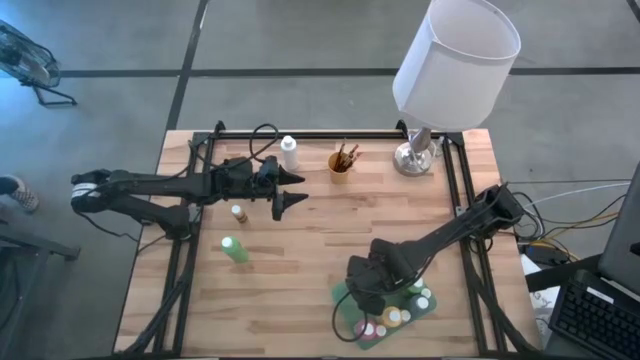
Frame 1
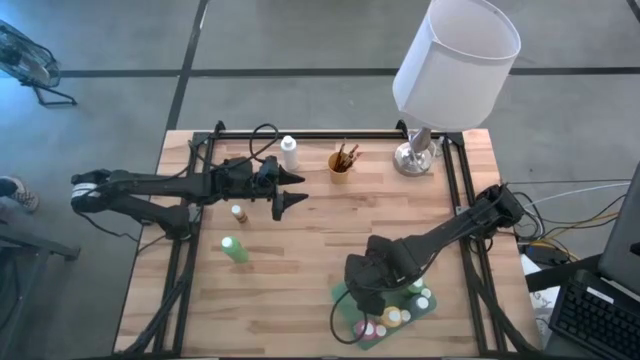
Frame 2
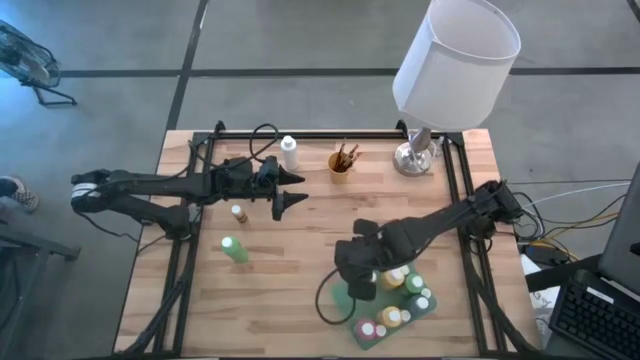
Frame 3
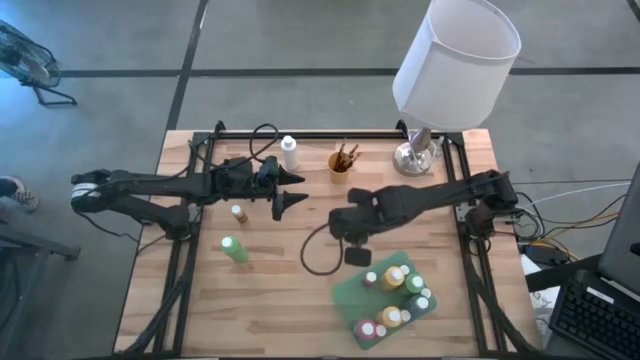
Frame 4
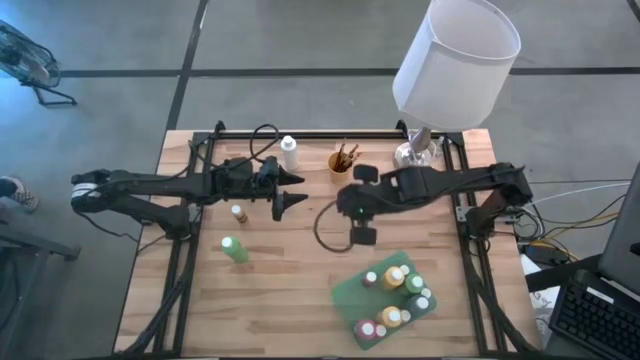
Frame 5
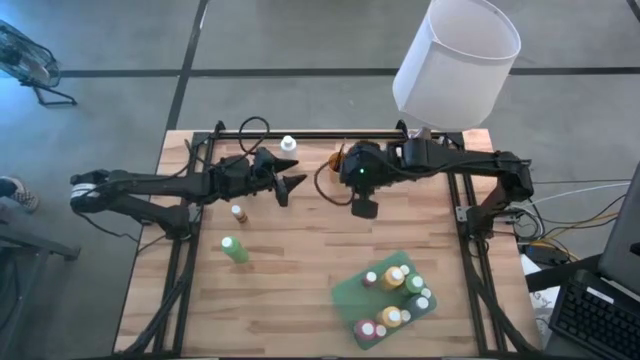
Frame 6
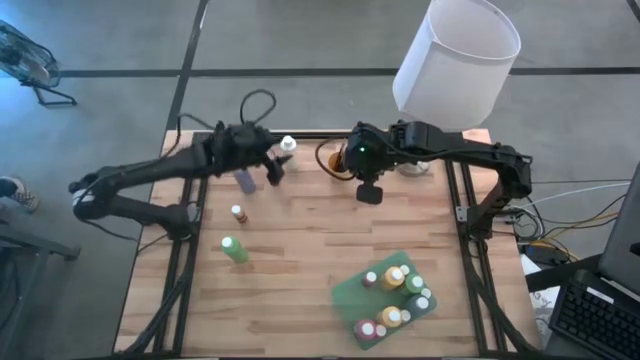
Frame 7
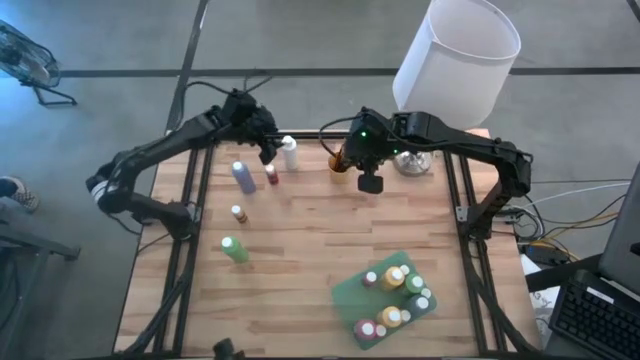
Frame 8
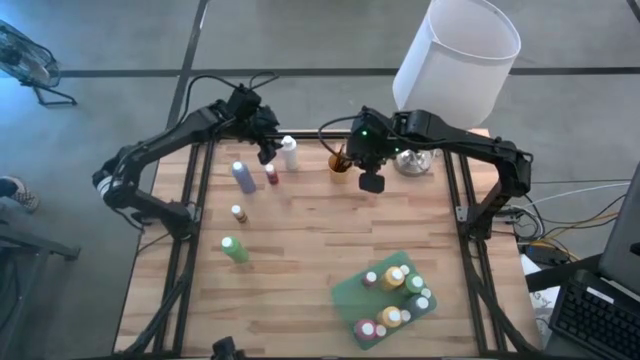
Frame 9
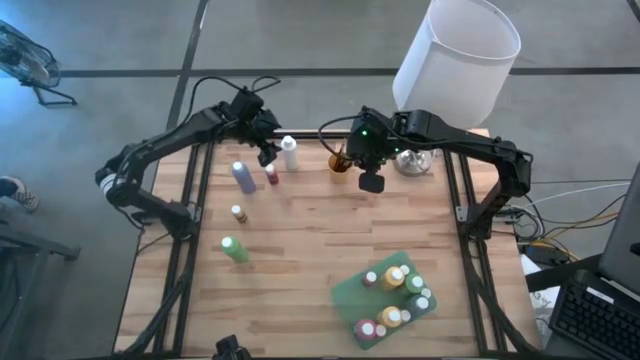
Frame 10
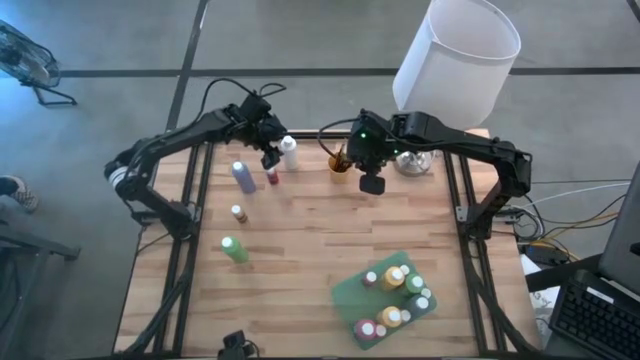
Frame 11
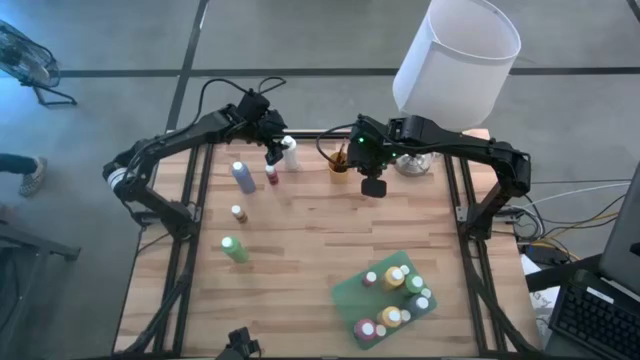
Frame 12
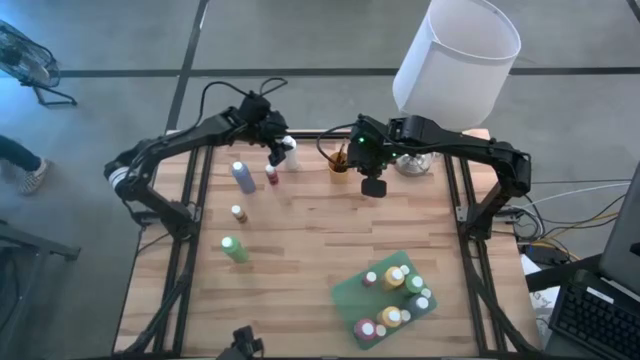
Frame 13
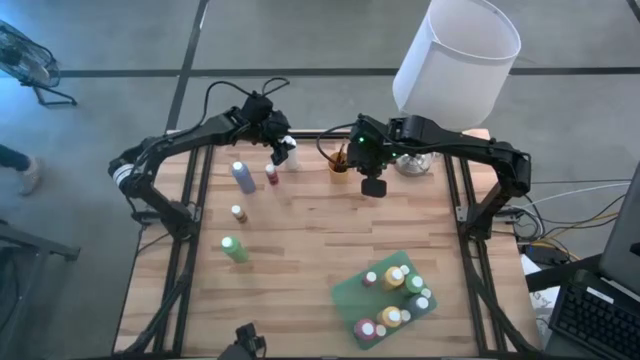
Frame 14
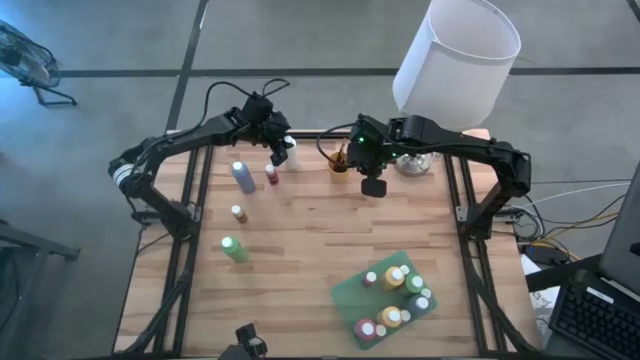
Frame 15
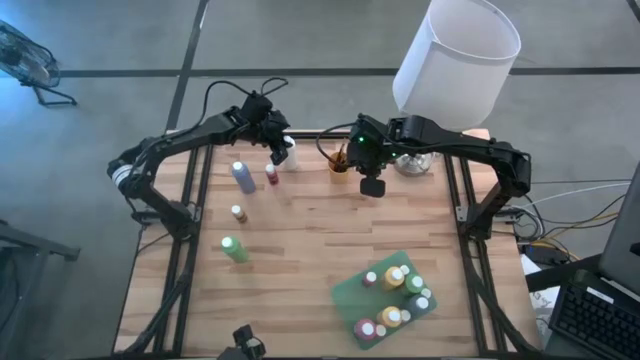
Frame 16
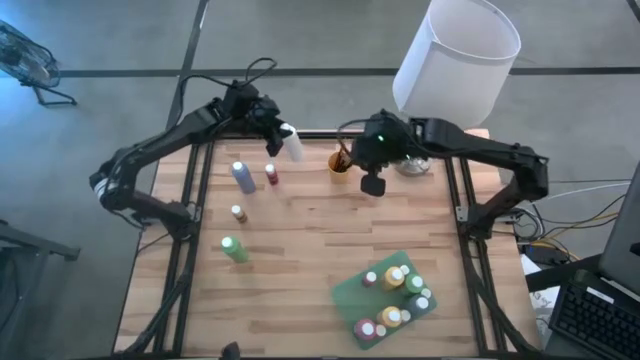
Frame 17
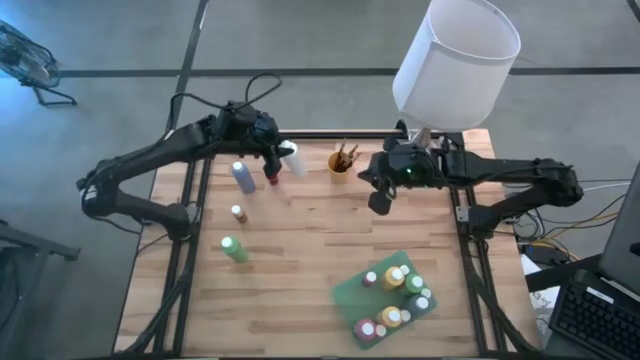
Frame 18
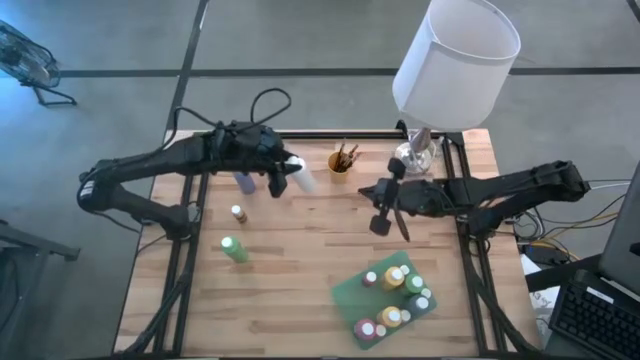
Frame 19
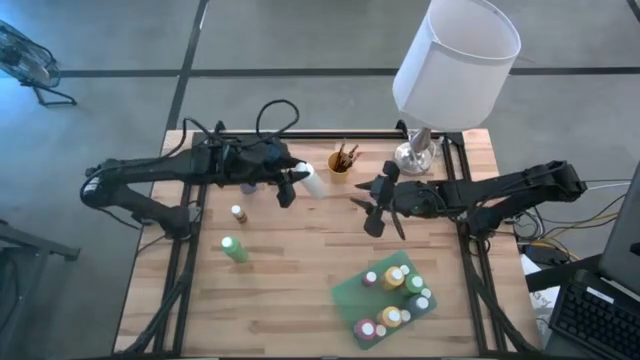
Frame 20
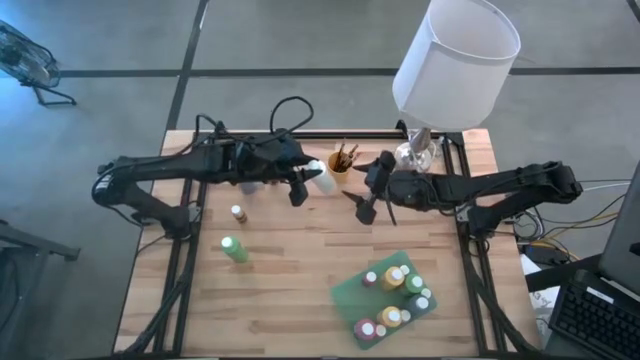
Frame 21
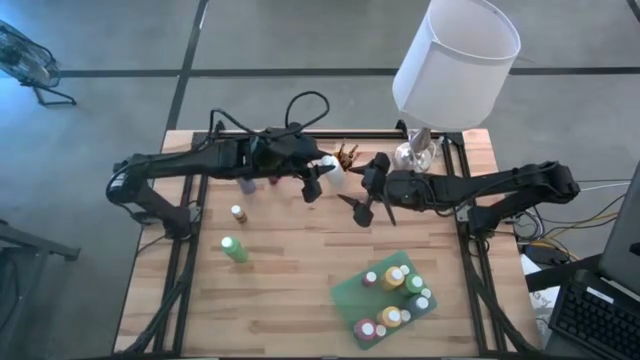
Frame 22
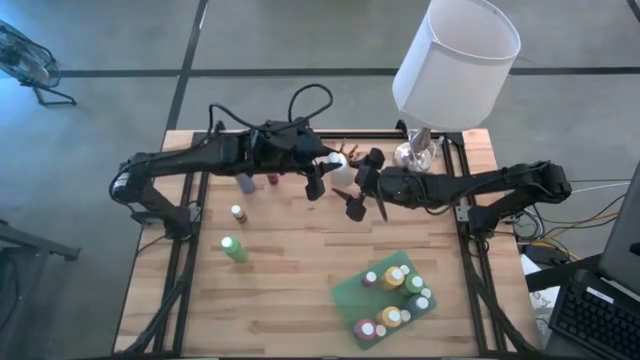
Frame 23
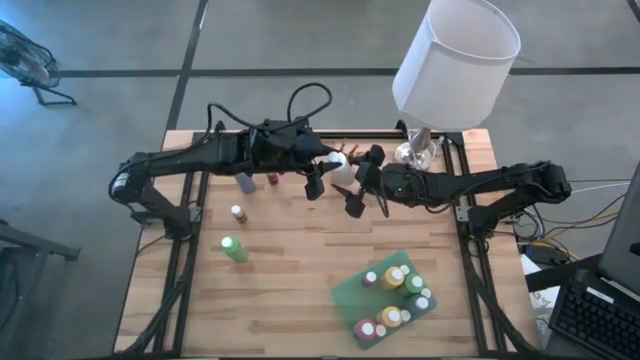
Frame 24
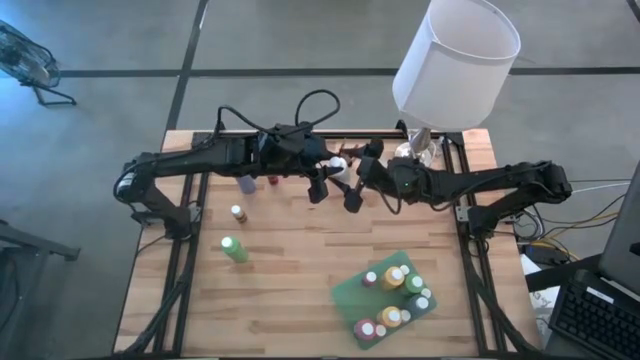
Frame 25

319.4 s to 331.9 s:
Task: Pick & Place Paint Supplies
Put the big white paint bottle into the green bin

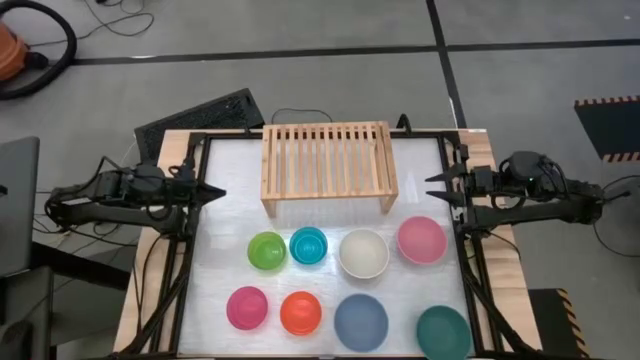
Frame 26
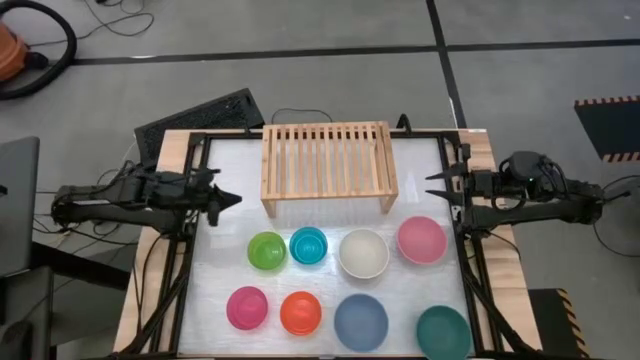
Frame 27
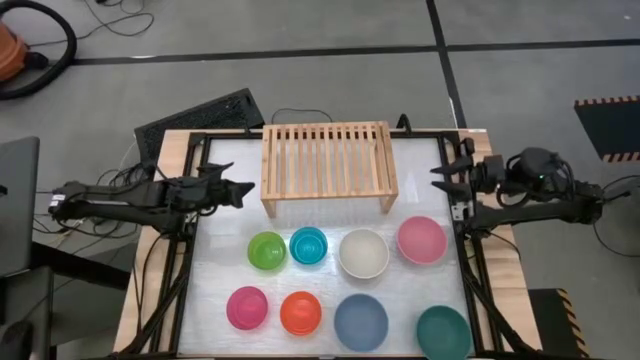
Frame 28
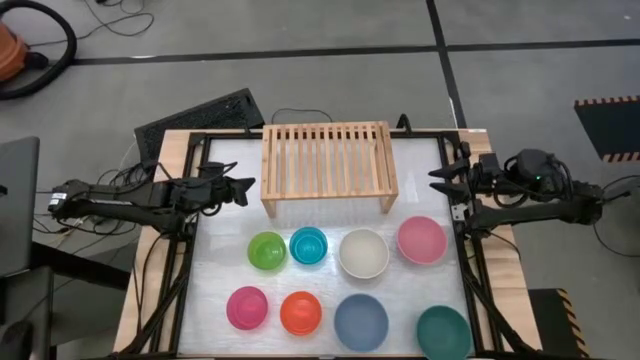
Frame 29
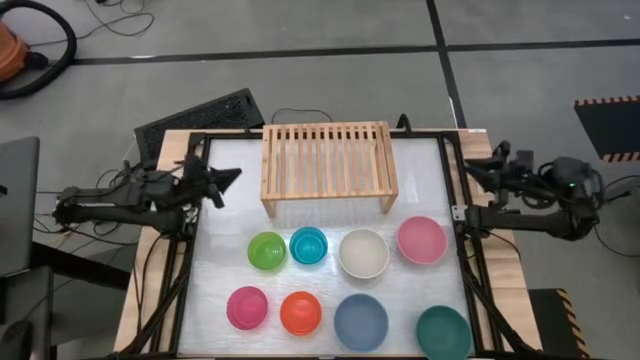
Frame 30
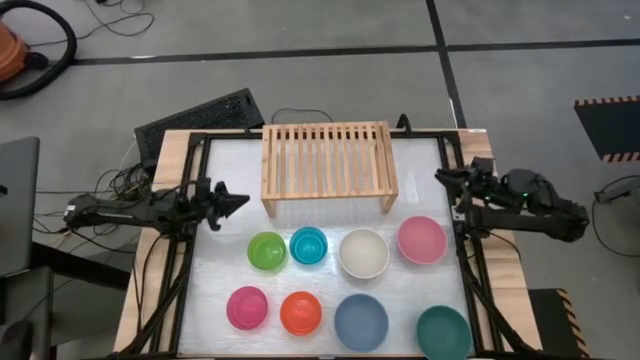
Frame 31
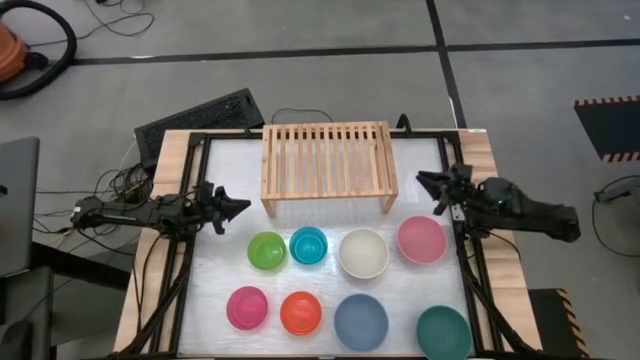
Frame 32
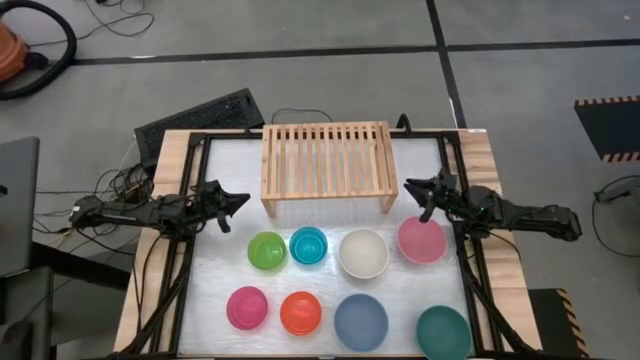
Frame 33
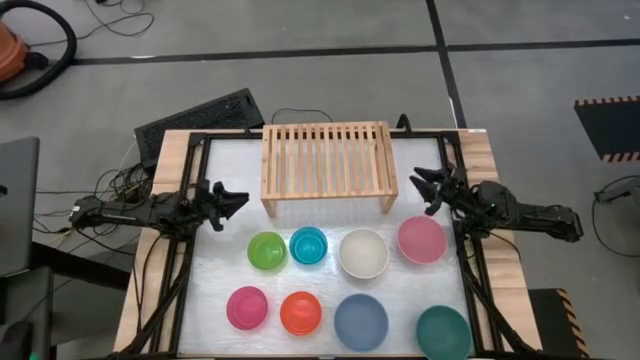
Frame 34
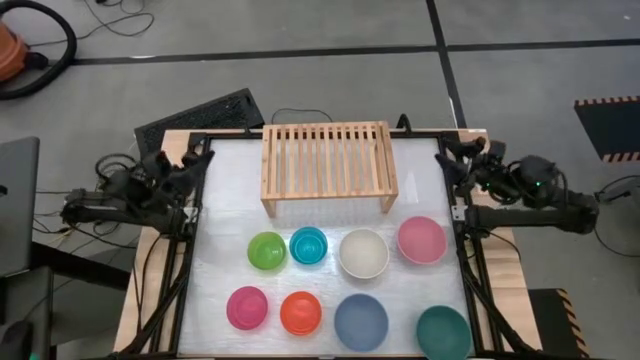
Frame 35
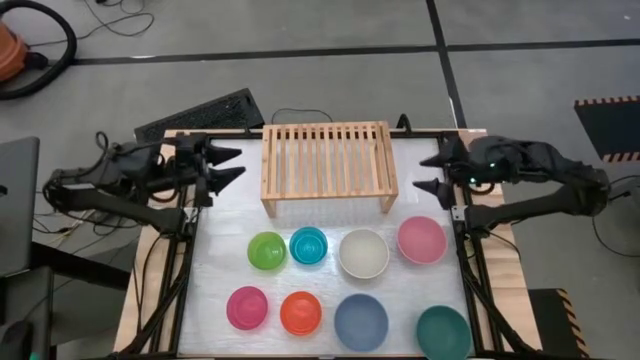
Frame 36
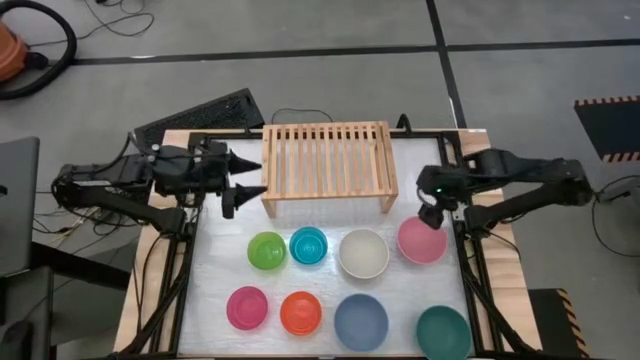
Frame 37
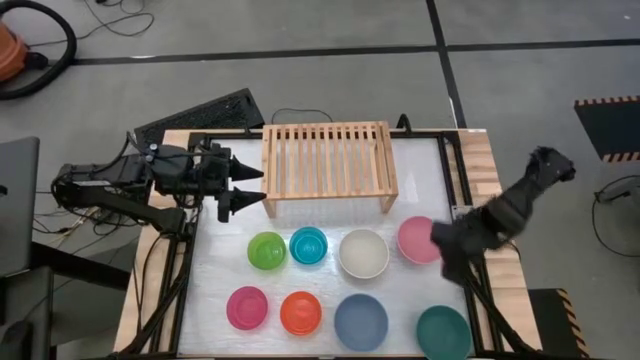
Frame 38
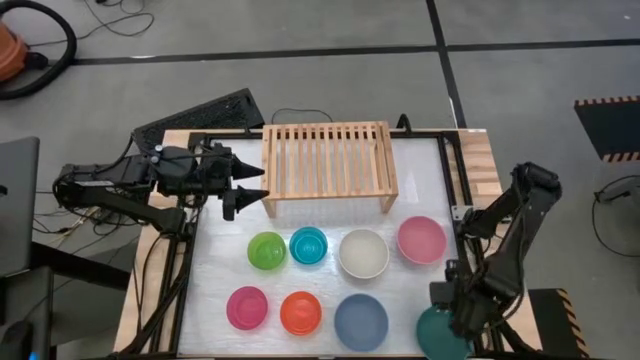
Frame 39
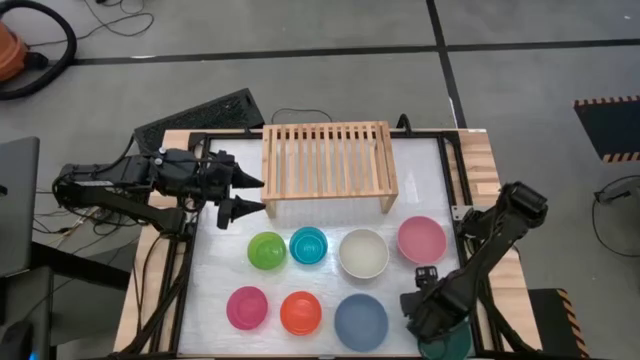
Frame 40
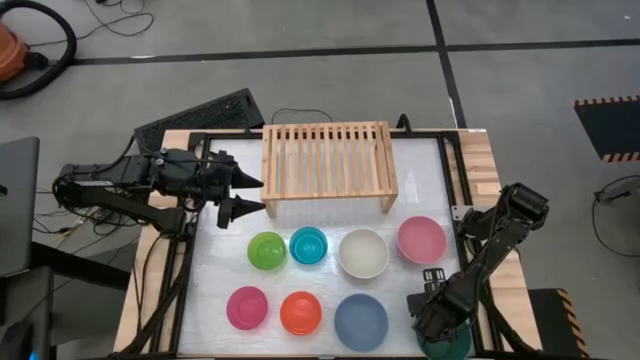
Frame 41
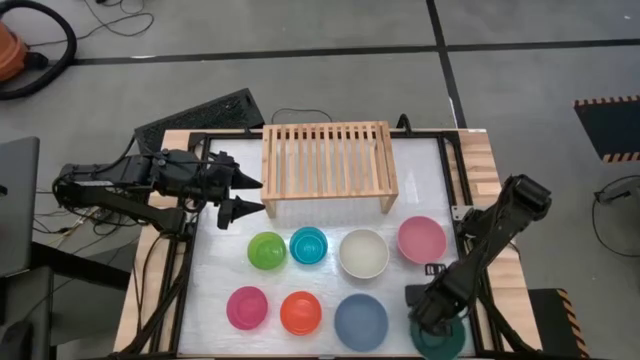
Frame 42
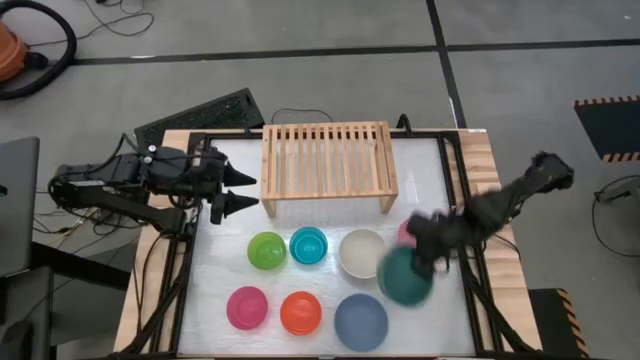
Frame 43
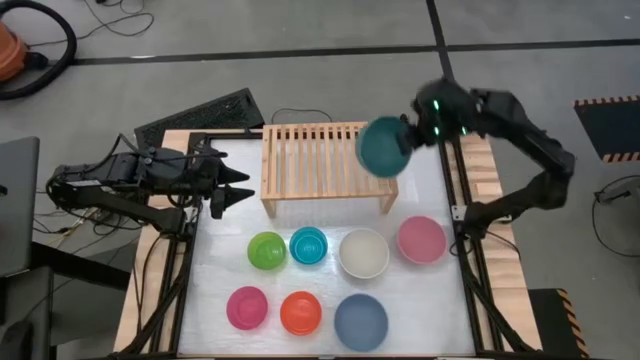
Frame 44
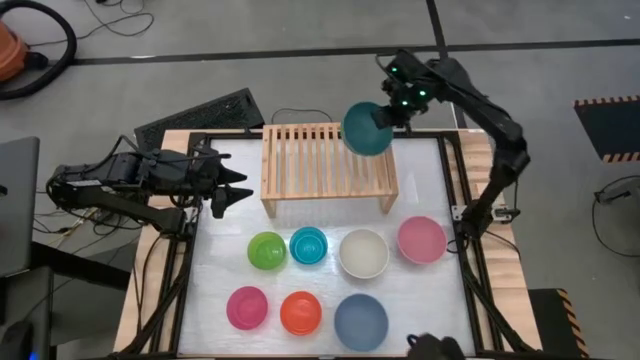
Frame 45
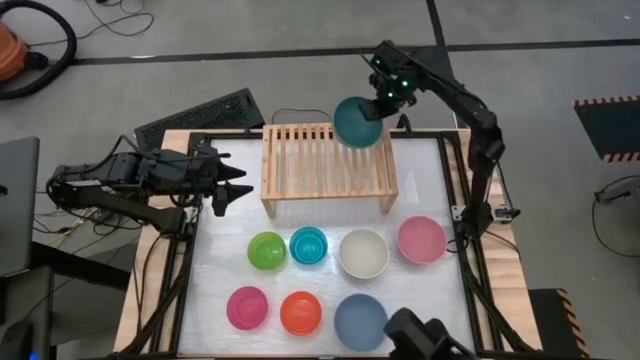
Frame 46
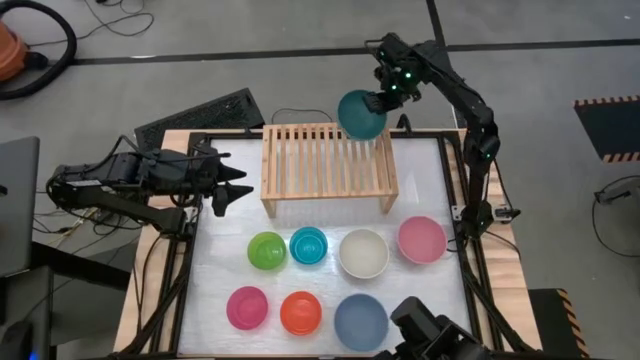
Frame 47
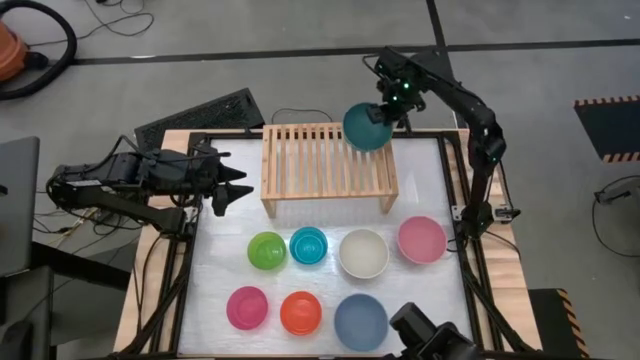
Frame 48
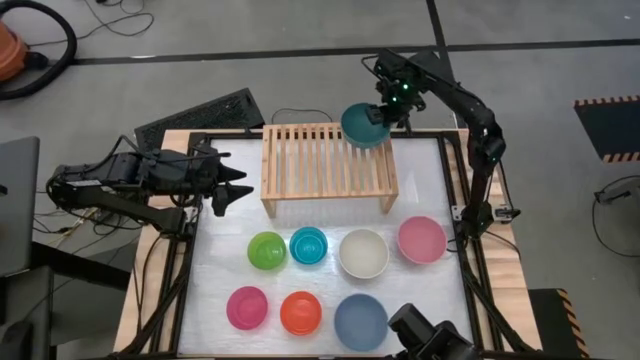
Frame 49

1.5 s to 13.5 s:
Task: Place and stack bowls onto a shelf
Put the large dark blue bowl on the shelf
